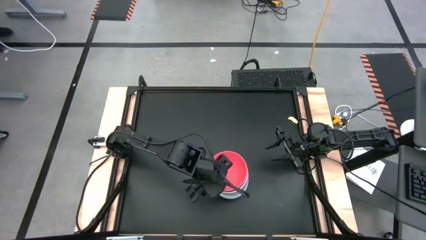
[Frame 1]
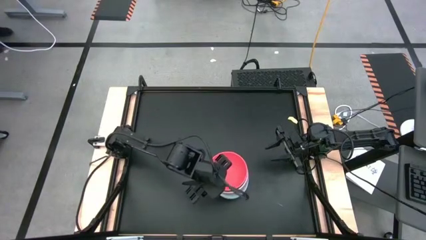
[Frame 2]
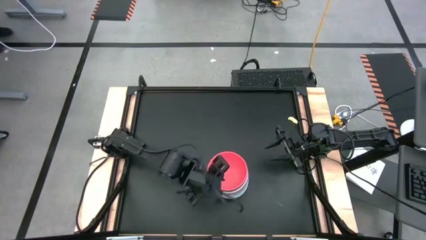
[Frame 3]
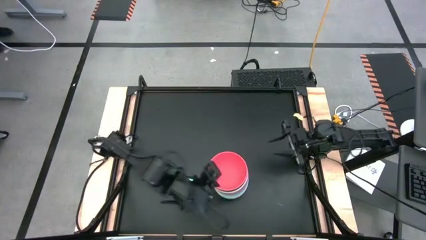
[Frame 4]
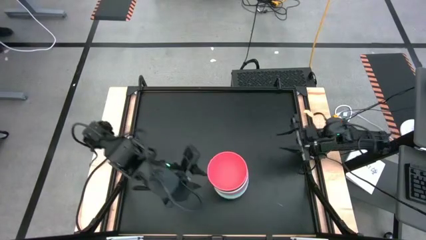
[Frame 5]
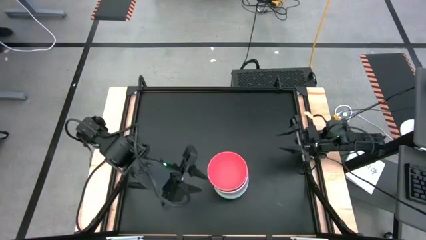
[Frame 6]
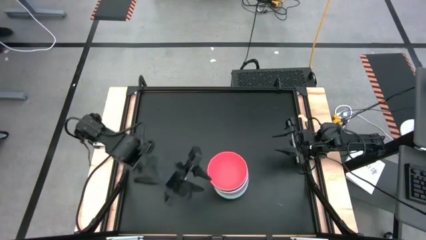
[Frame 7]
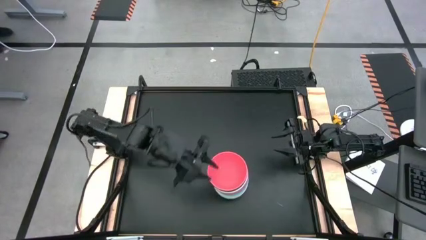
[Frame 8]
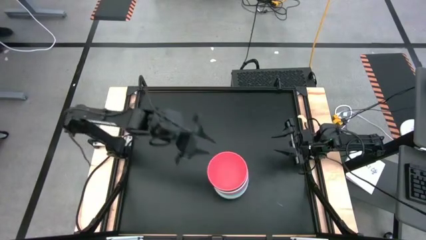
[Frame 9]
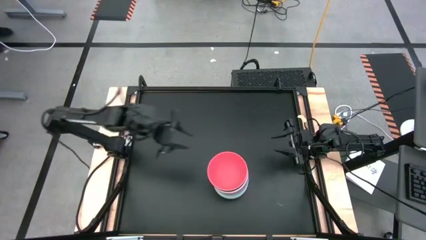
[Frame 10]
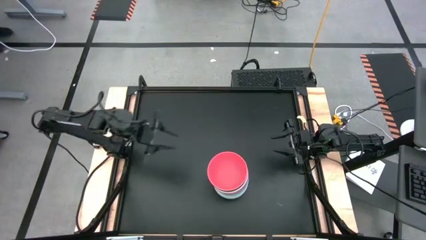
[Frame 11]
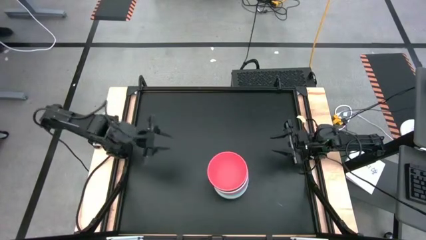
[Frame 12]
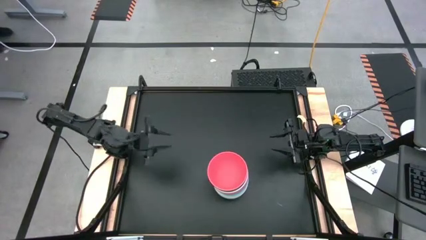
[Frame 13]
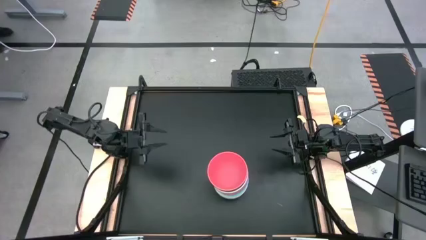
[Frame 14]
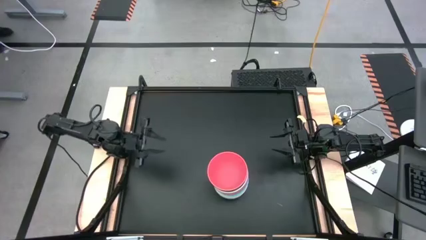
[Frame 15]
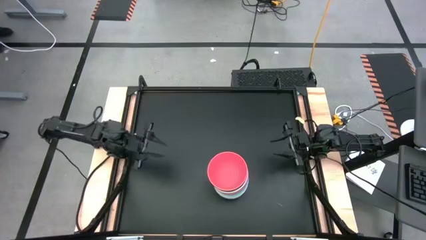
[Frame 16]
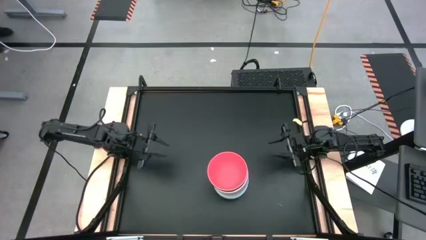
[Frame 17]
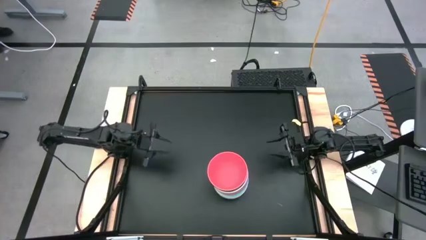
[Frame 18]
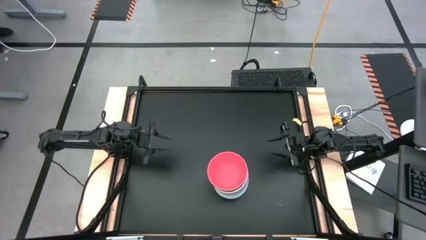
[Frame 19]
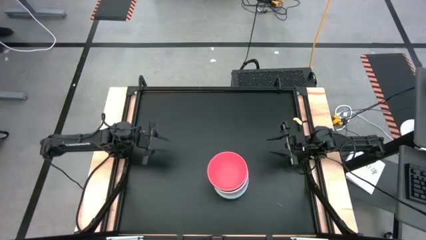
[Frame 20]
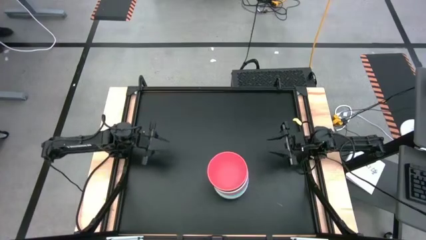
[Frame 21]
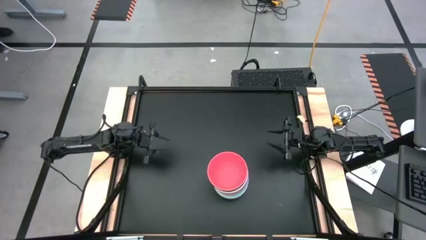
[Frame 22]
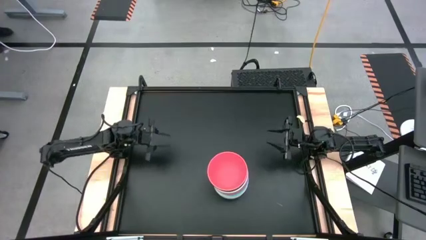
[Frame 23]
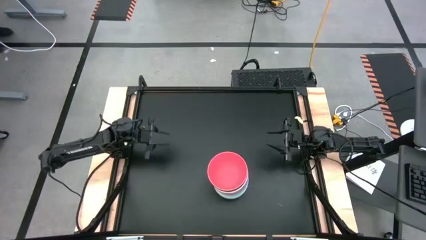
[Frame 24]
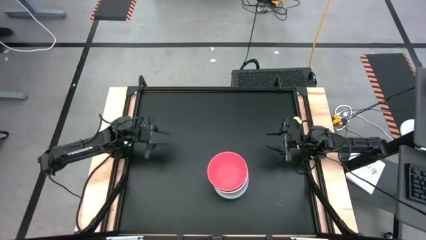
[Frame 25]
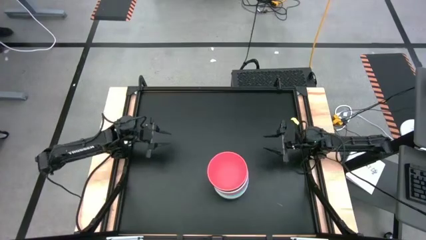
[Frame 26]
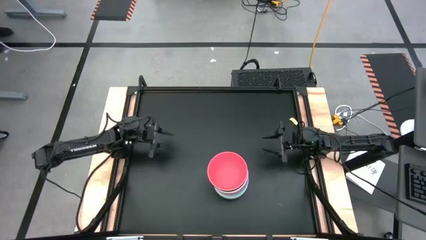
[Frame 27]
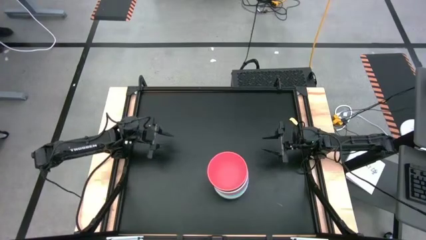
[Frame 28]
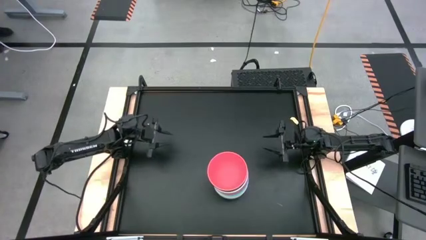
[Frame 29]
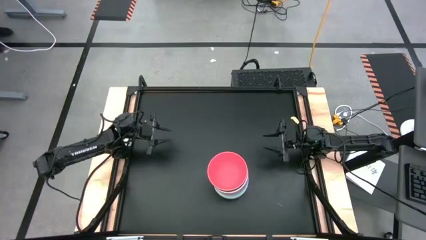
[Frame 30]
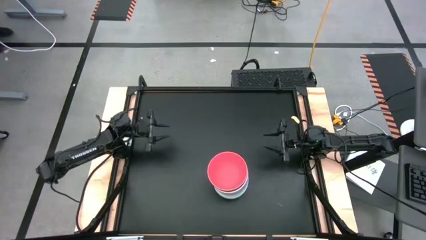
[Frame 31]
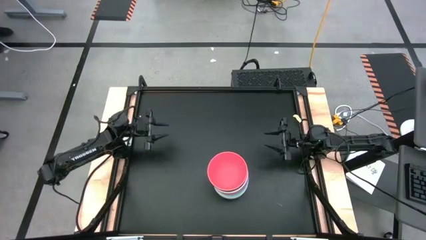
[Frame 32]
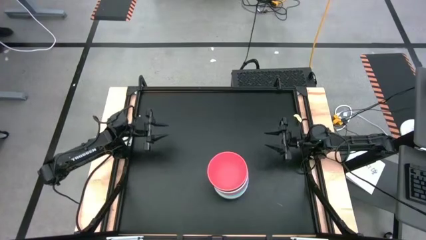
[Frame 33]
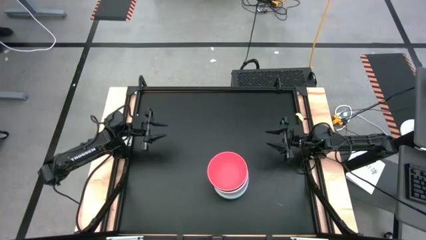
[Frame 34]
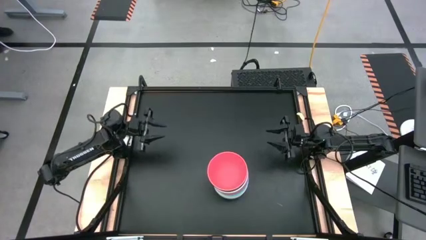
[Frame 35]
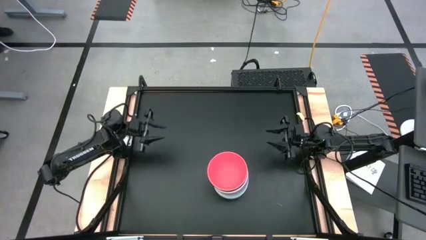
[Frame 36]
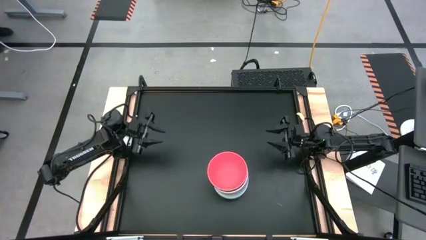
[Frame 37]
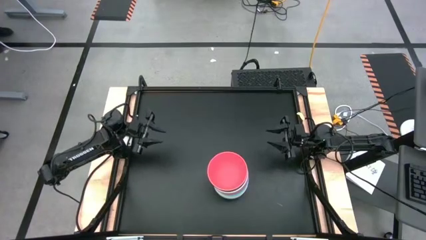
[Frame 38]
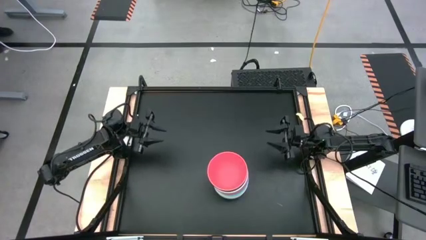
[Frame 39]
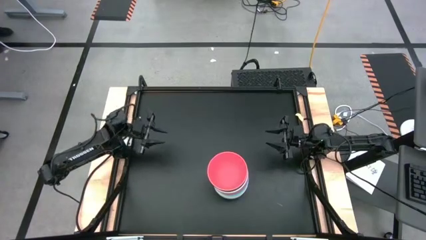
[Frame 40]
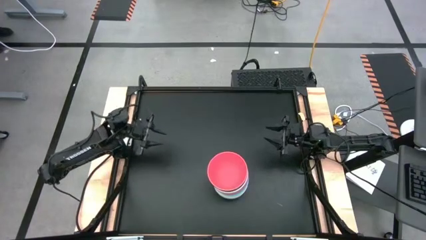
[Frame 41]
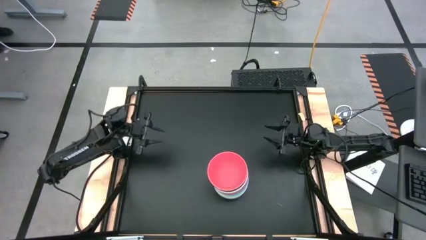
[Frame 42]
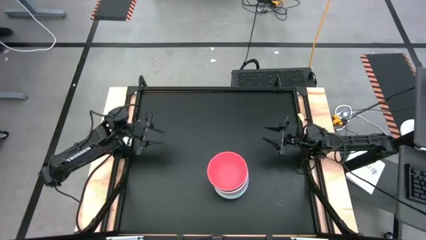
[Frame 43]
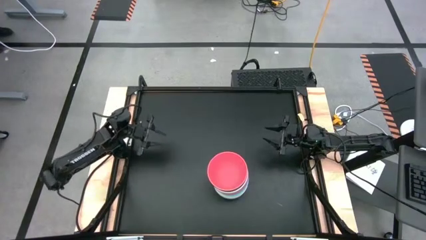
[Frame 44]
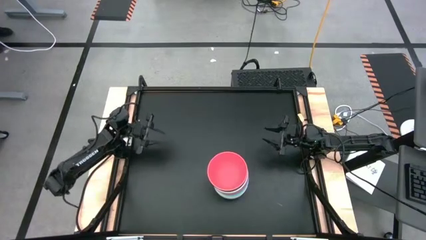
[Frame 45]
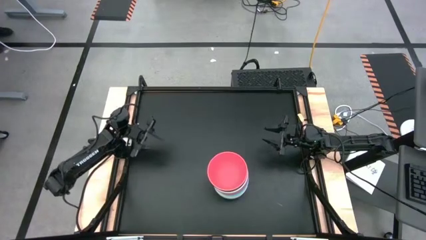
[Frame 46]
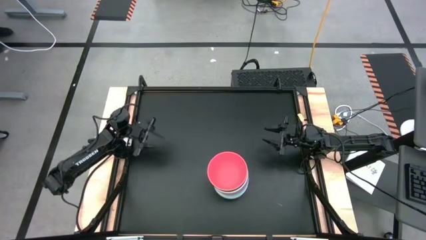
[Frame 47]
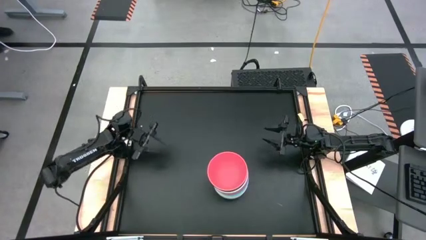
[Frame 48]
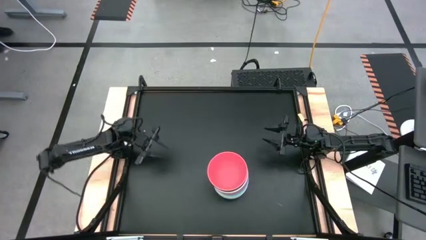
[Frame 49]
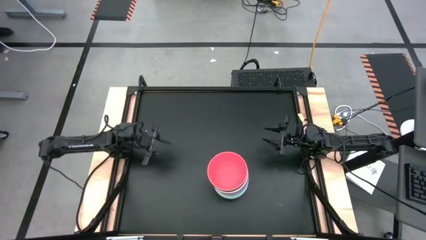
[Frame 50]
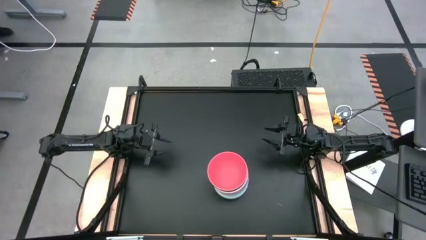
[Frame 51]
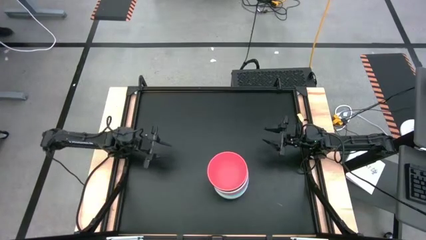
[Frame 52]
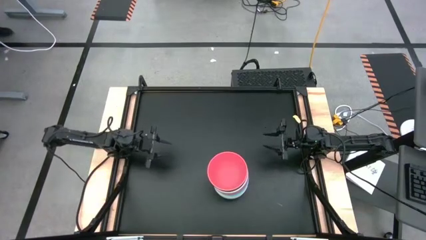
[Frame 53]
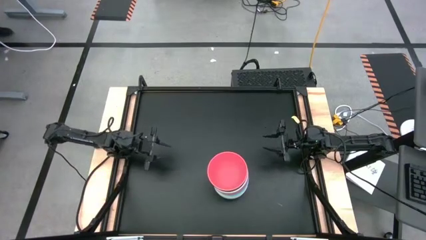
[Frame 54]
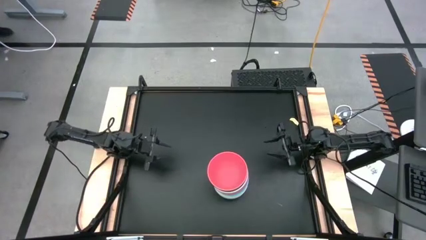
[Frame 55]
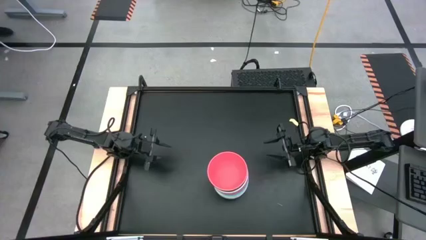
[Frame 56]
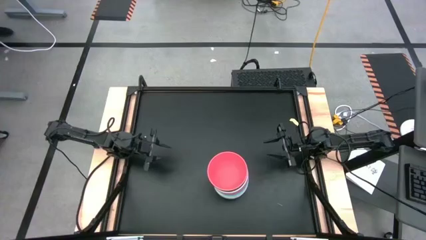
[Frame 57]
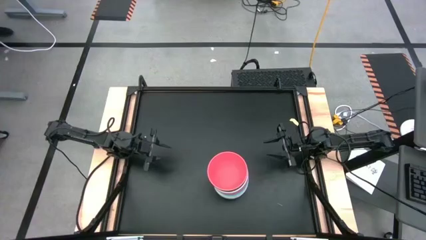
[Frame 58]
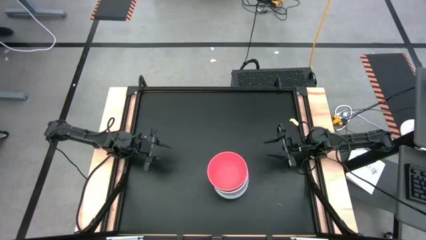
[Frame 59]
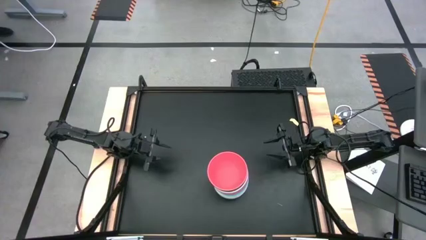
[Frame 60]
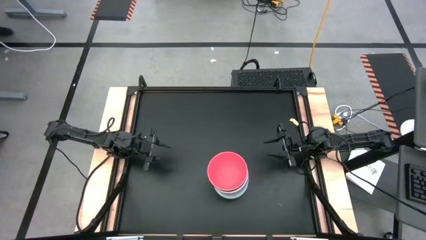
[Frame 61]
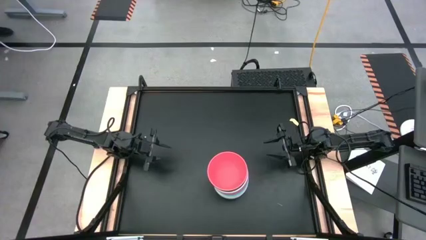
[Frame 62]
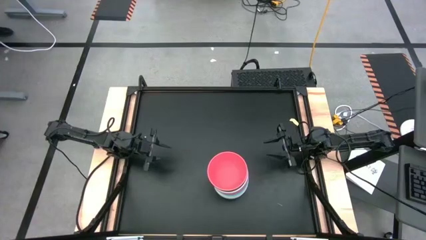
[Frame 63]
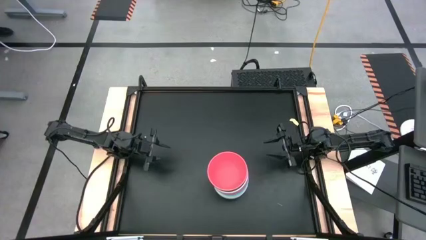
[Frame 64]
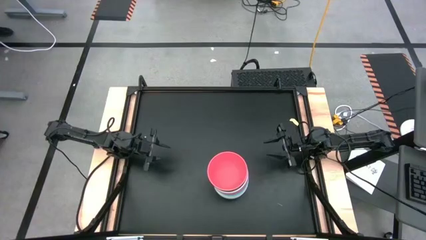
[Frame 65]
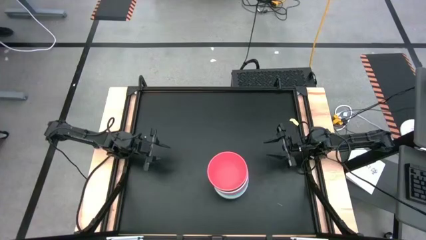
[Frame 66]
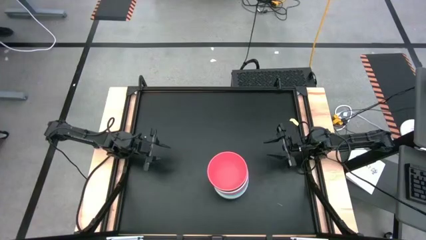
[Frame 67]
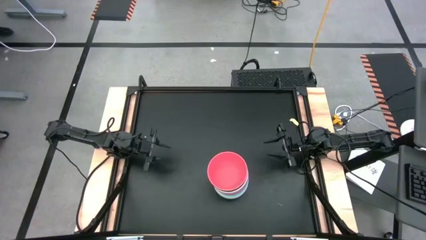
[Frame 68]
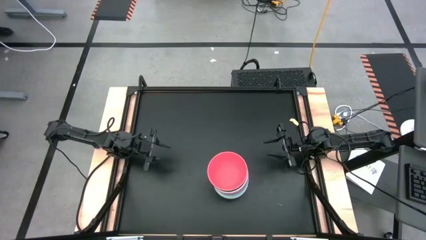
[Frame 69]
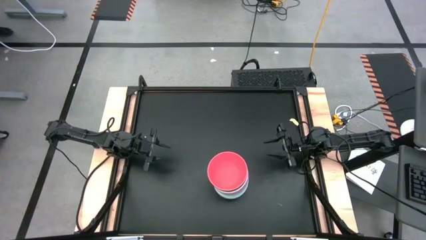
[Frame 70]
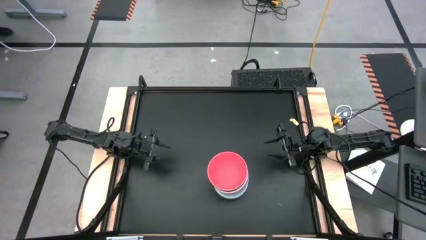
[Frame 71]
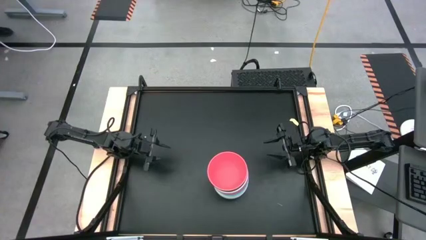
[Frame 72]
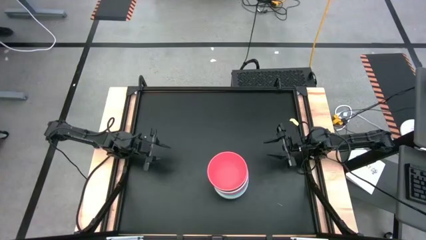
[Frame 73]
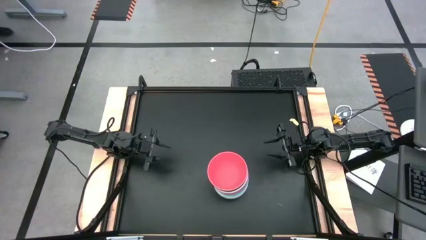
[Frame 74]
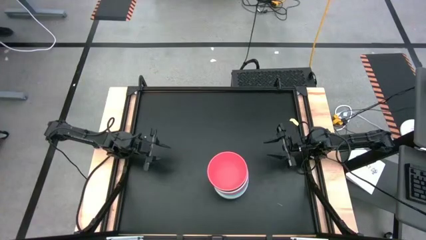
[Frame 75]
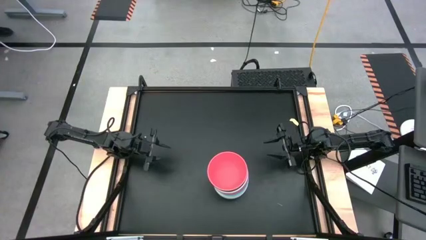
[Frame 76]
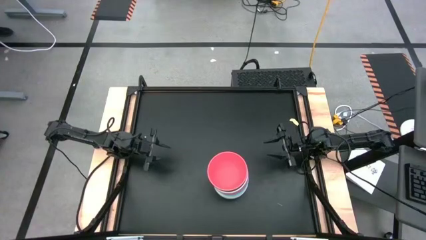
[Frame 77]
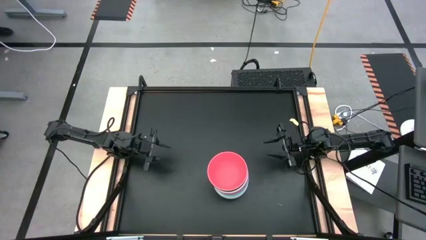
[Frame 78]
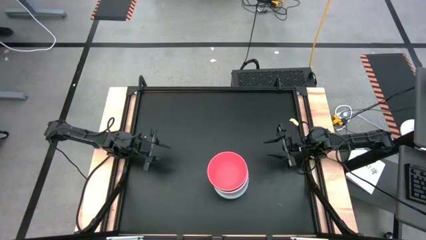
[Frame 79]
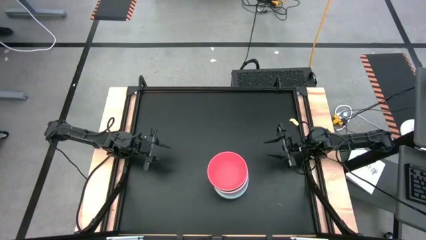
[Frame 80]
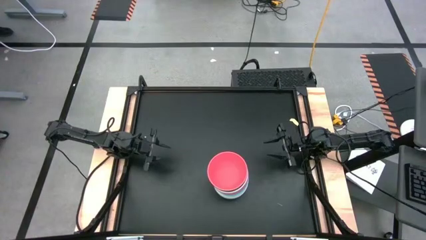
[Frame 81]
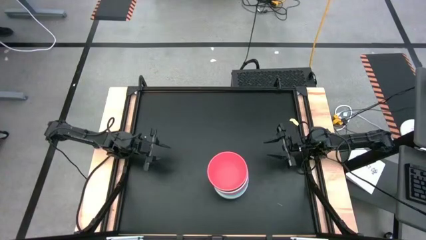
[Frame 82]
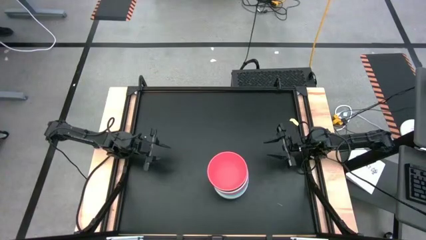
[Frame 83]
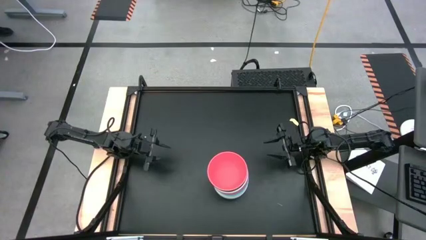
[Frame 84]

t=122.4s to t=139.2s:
Task: Nest bowls inside each other
Return to Home Position
